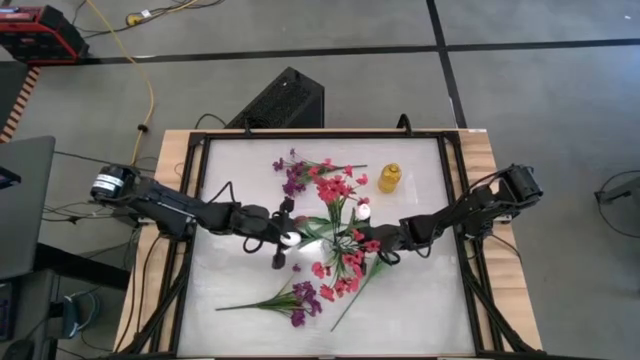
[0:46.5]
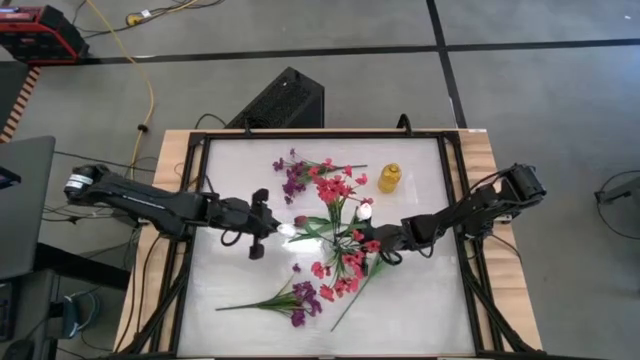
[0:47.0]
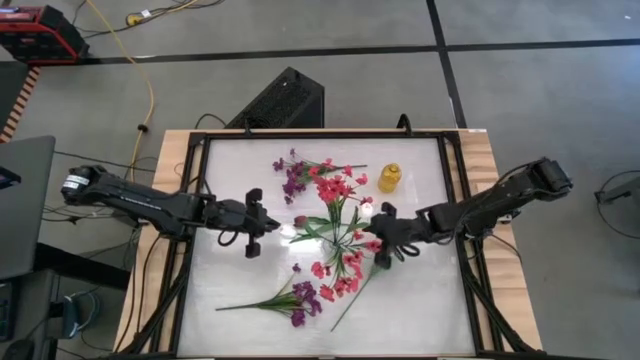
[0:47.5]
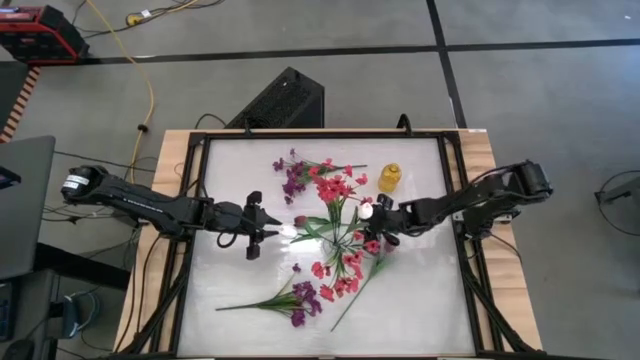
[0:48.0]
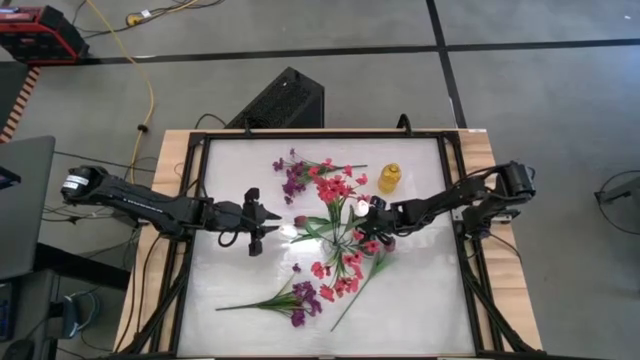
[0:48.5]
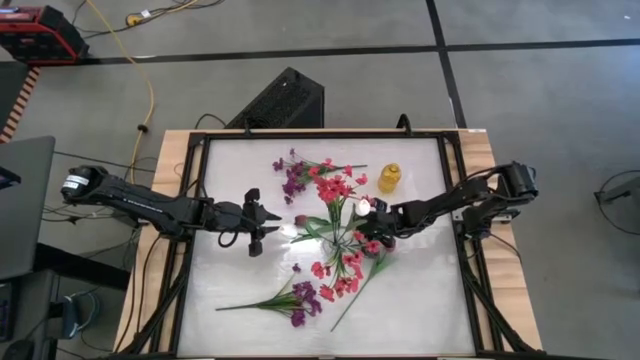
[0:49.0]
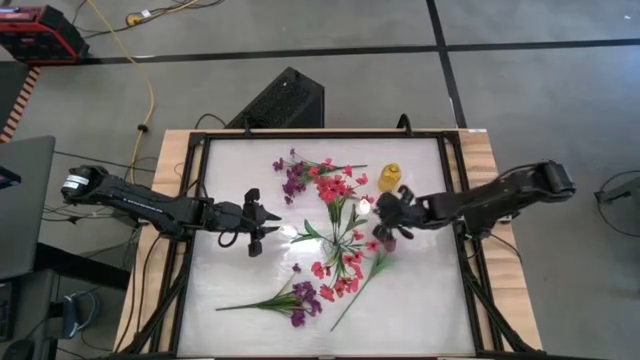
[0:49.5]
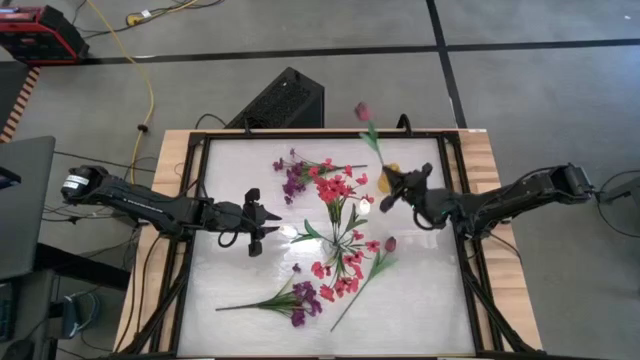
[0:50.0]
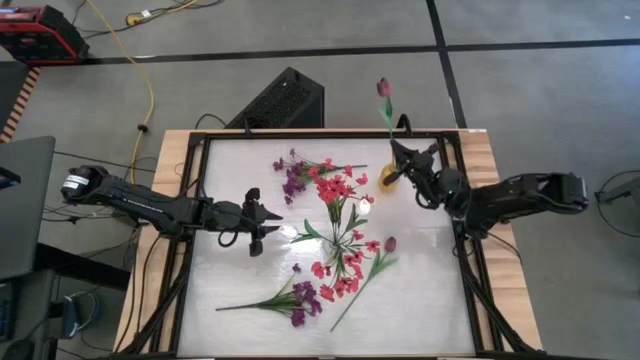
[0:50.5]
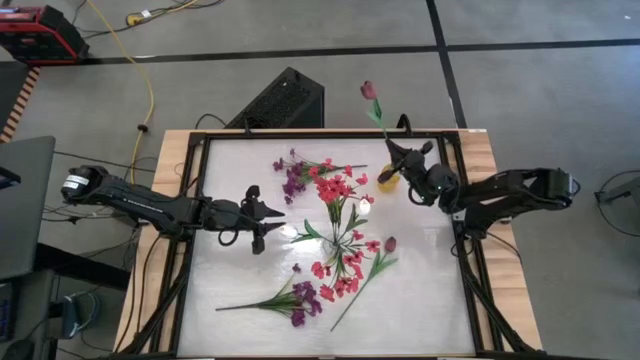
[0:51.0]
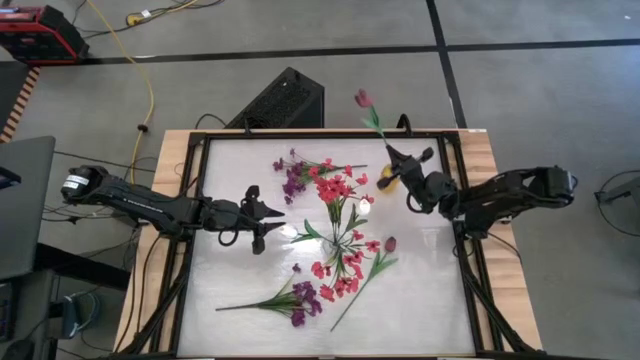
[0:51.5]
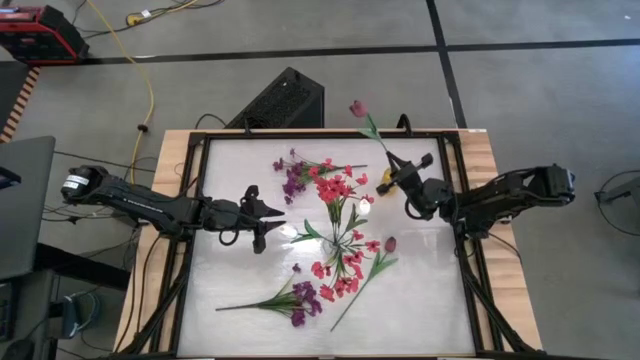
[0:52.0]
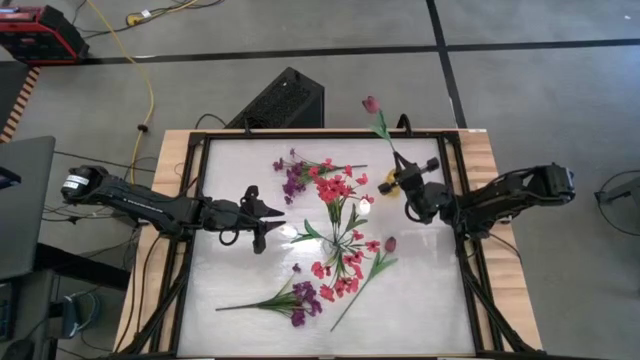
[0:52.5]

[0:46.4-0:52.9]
Task: Sort flowers into vase by color
Put the top dark red tulip into the yellow vase

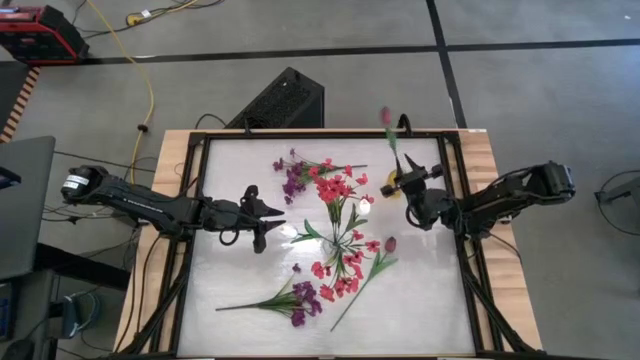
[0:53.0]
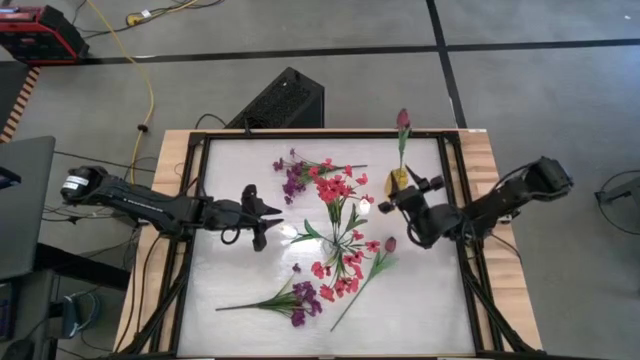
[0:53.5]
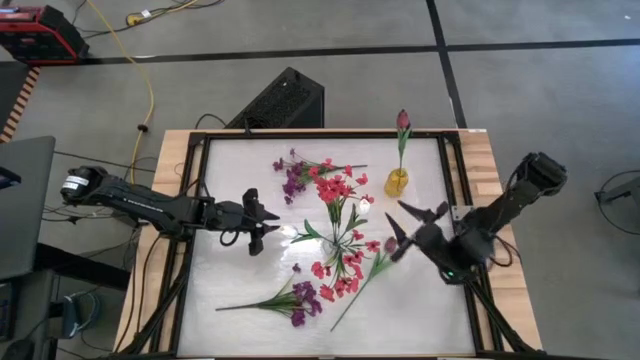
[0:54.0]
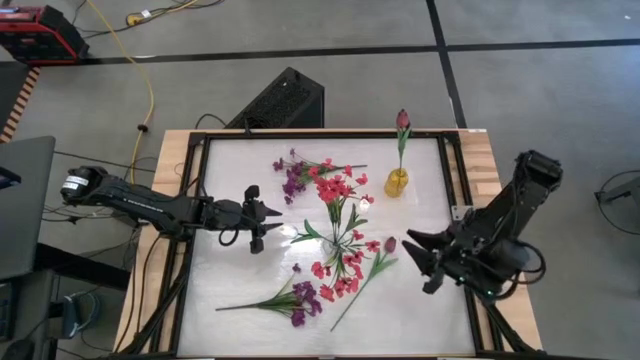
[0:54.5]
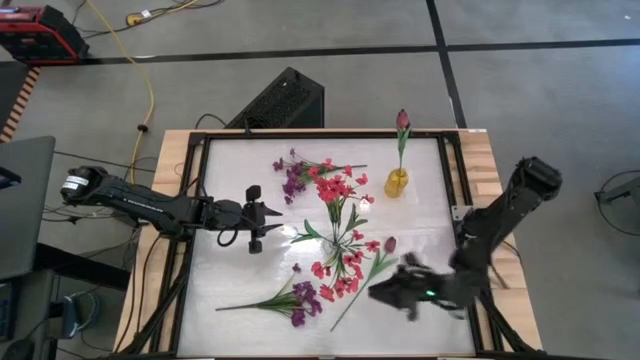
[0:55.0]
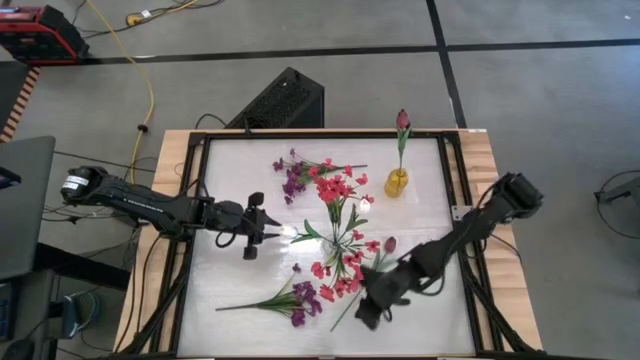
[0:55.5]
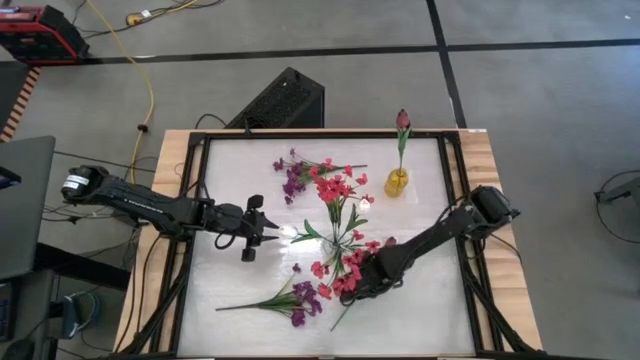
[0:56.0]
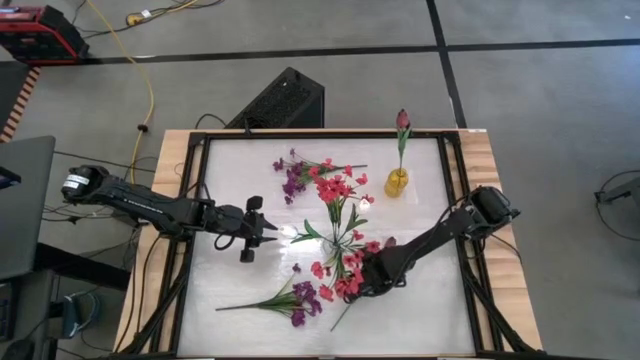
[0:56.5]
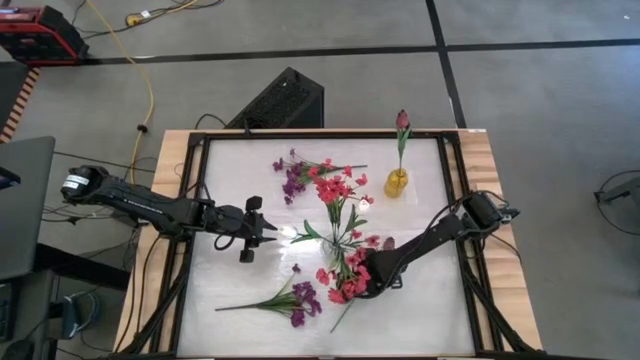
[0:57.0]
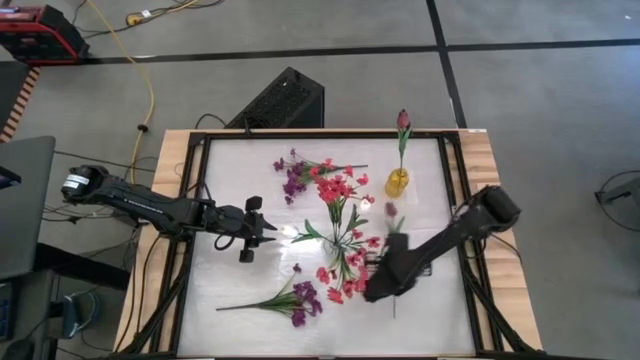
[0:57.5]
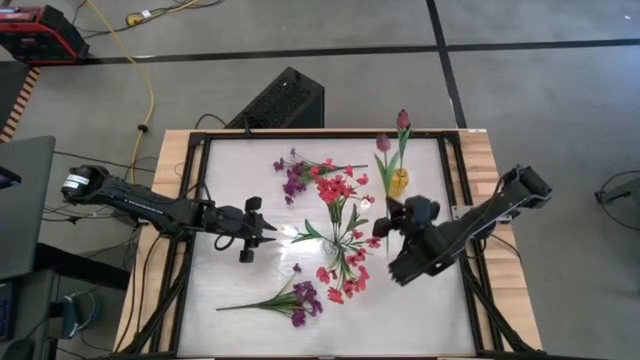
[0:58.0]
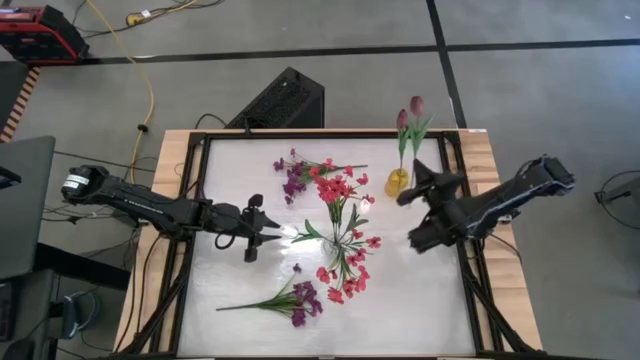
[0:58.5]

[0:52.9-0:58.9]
Put the dark red tulip into the yellow vase

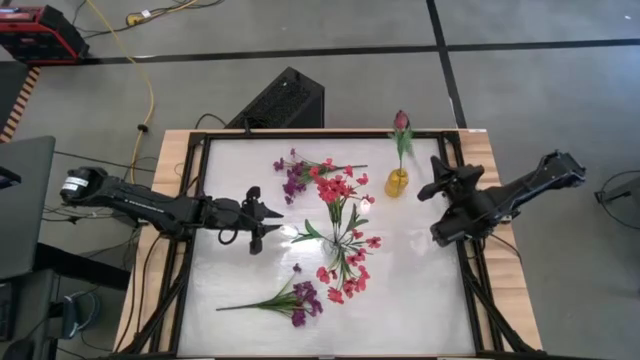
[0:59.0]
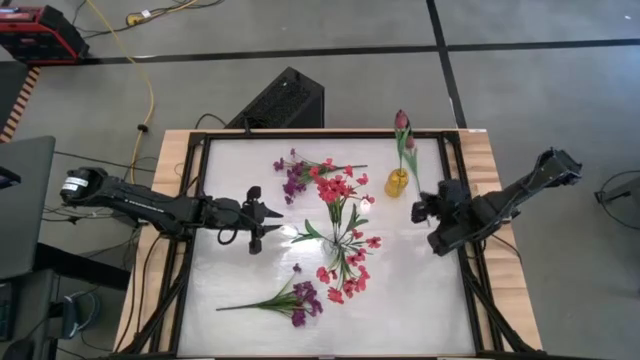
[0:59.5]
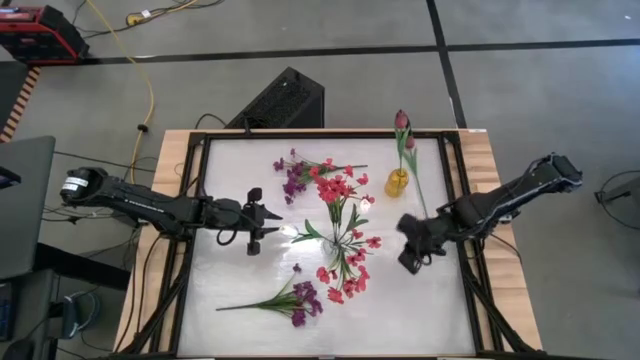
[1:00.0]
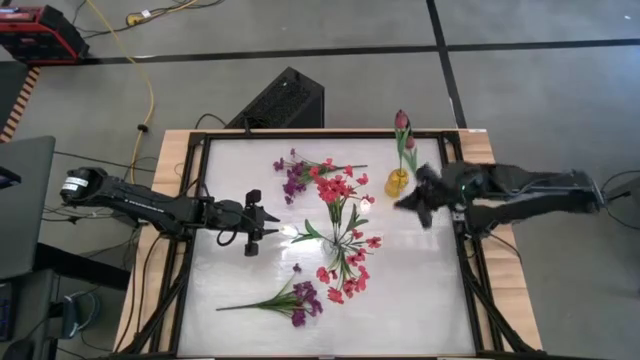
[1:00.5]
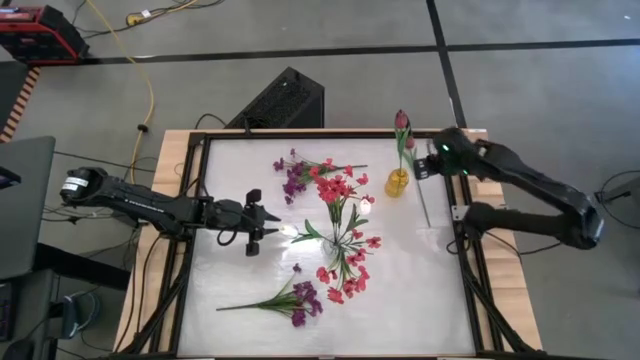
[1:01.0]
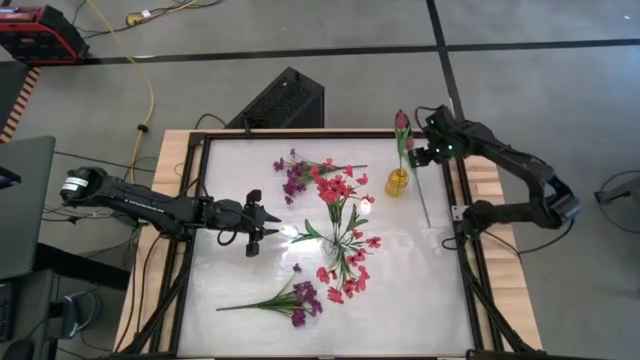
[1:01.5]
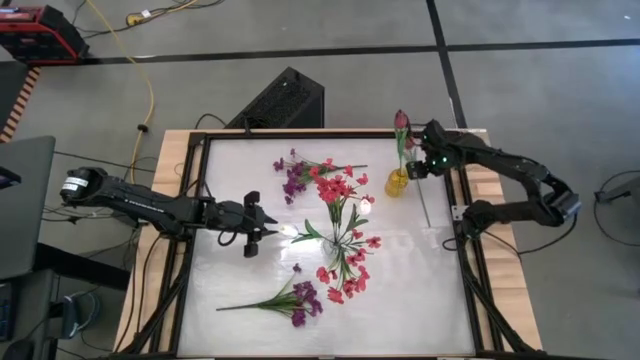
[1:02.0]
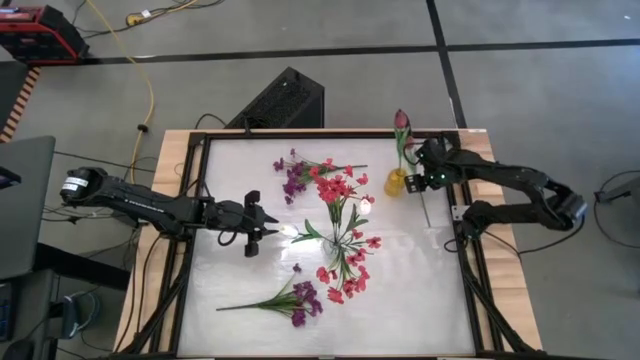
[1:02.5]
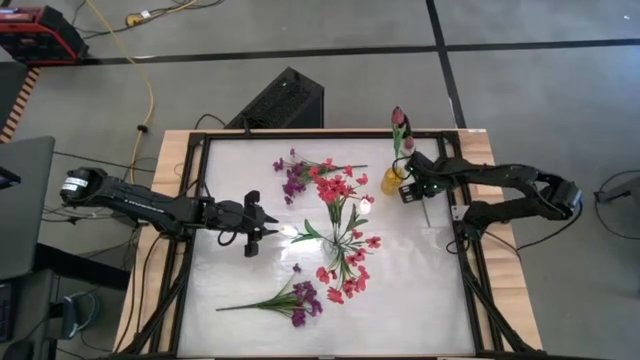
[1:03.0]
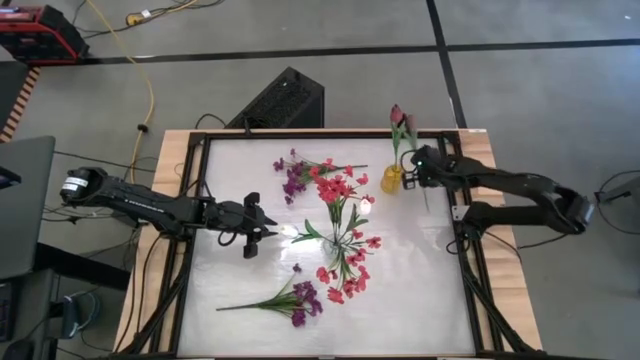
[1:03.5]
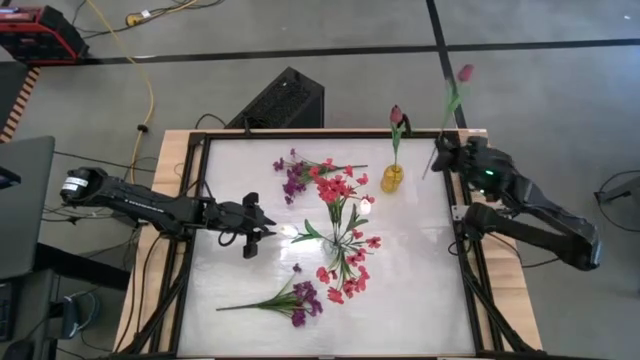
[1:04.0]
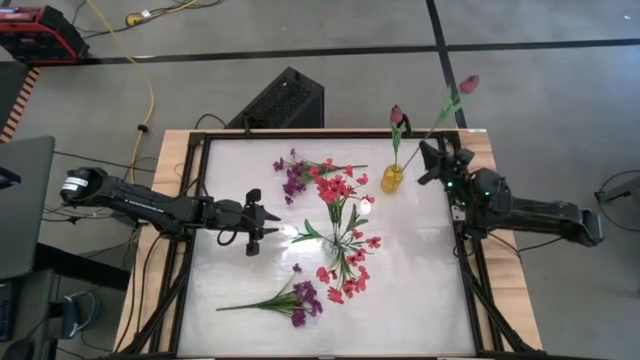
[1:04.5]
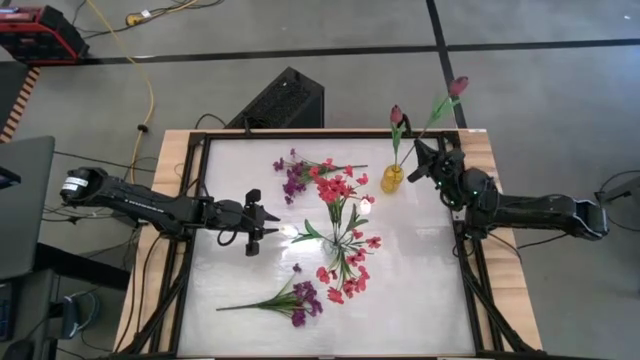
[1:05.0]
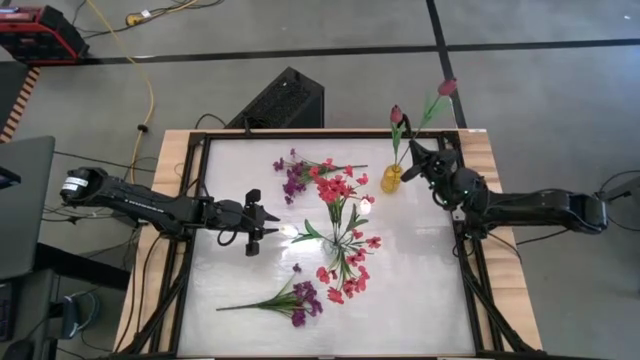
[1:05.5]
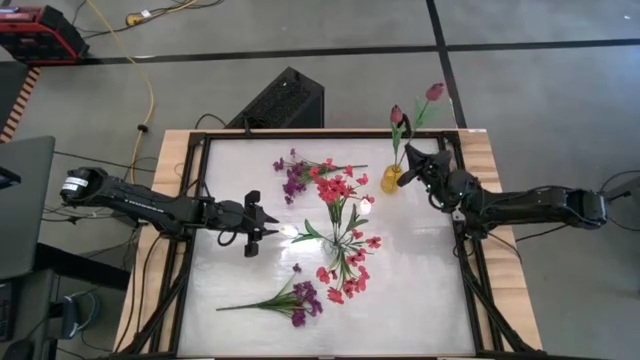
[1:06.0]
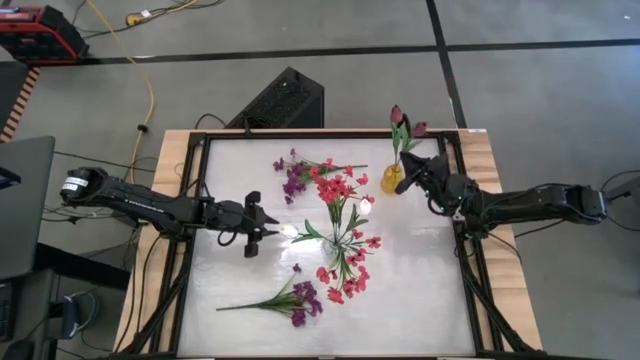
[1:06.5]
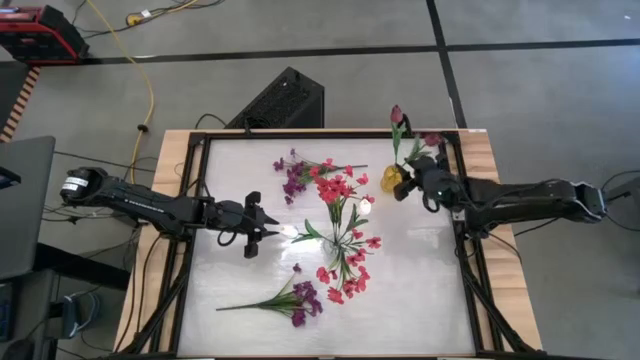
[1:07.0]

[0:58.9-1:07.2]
Put the dark red tulip into the yellow vase

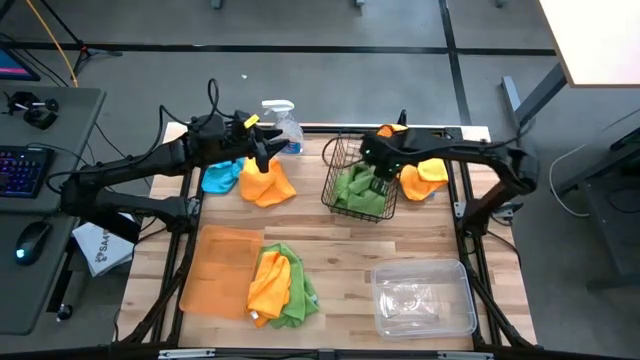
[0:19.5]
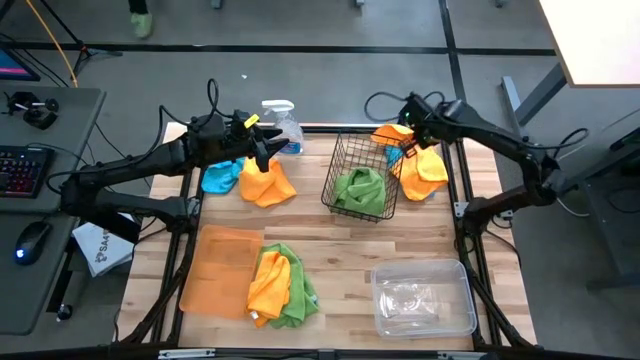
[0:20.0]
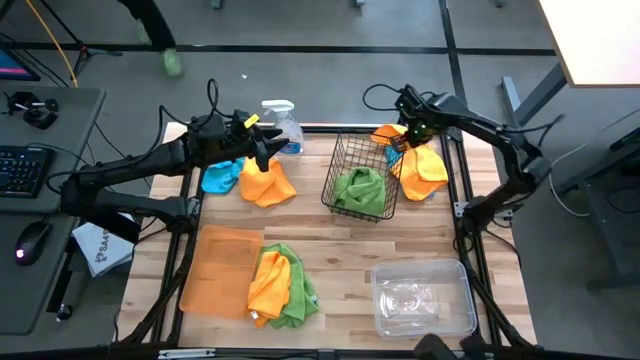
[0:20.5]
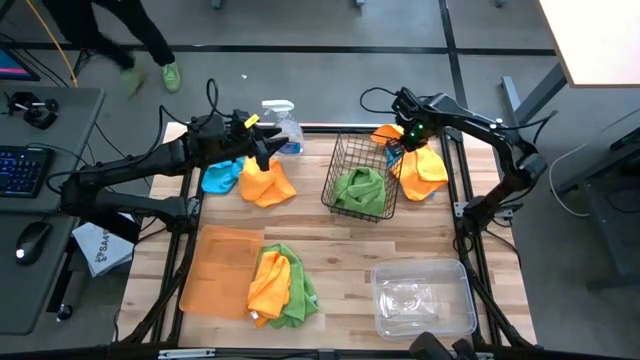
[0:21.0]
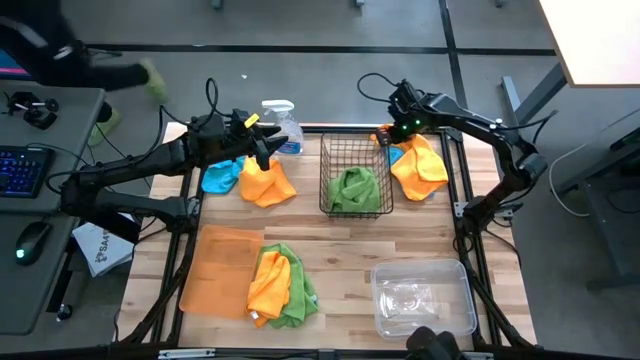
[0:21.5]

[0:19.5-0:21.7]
Task: Sort microfiber towel by color & place in baskets
Adjust the black mesh basket
